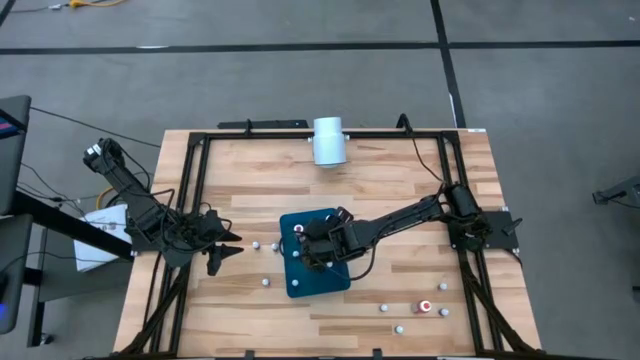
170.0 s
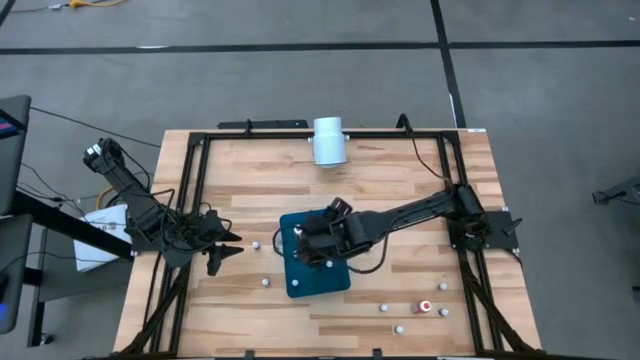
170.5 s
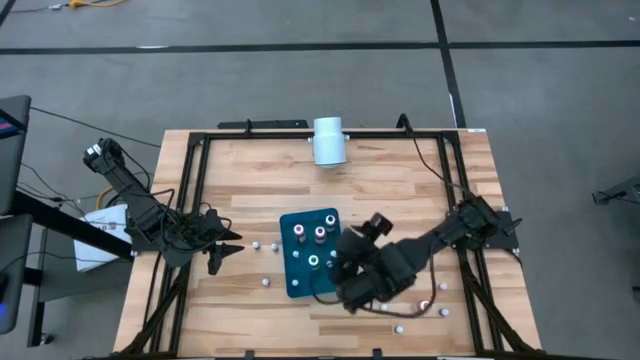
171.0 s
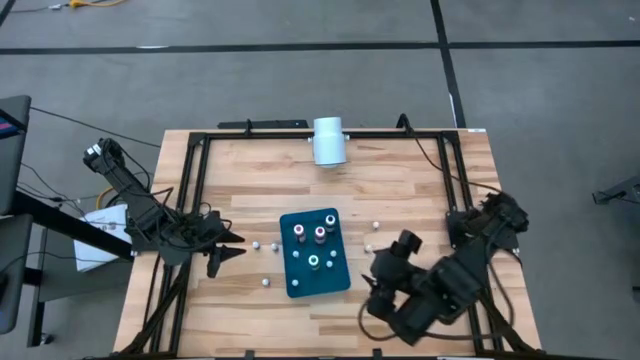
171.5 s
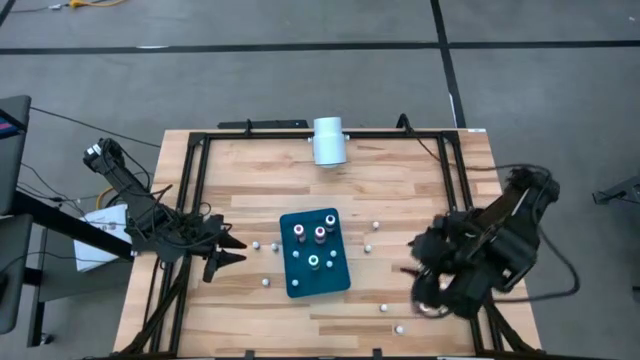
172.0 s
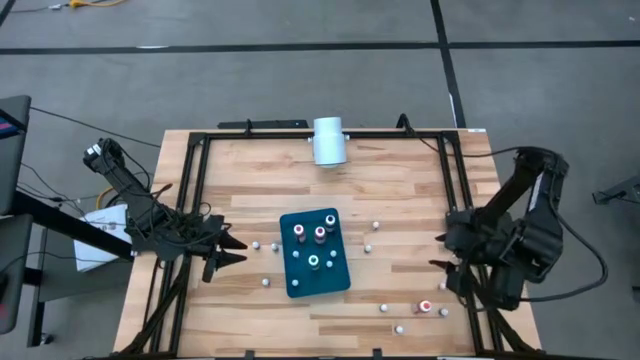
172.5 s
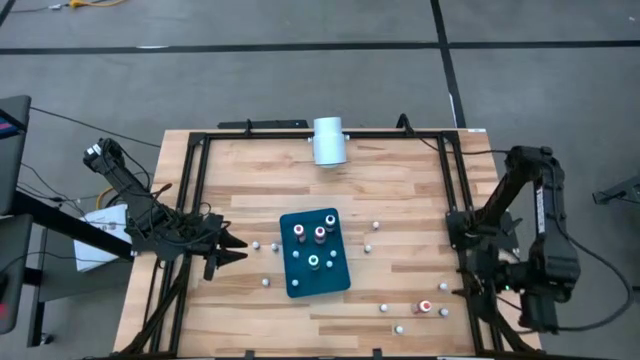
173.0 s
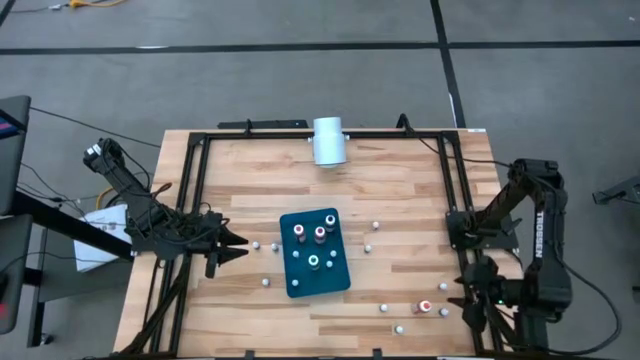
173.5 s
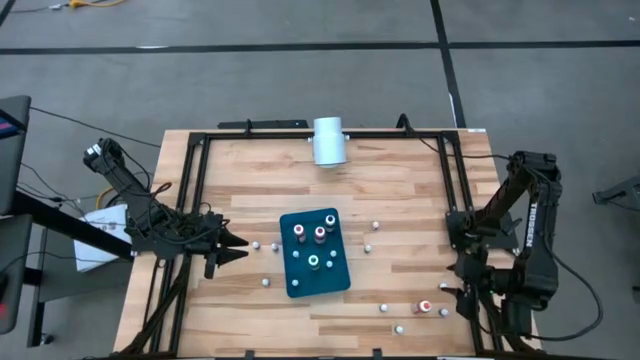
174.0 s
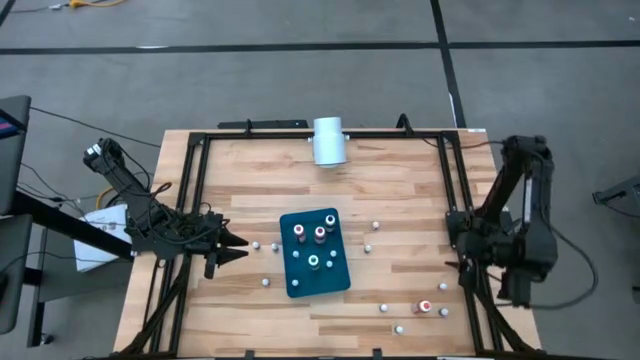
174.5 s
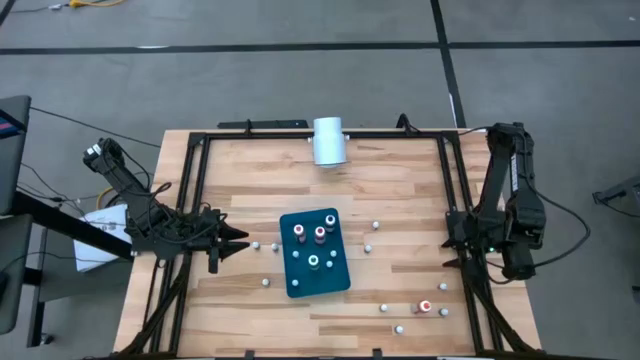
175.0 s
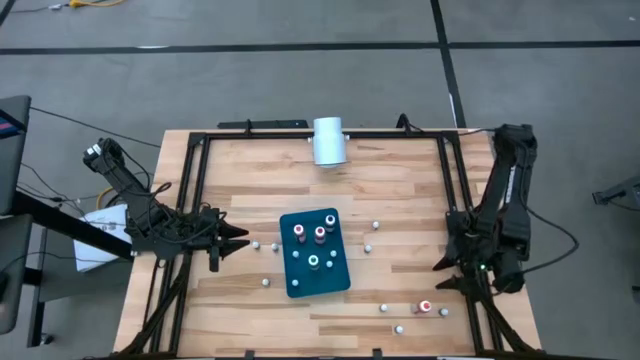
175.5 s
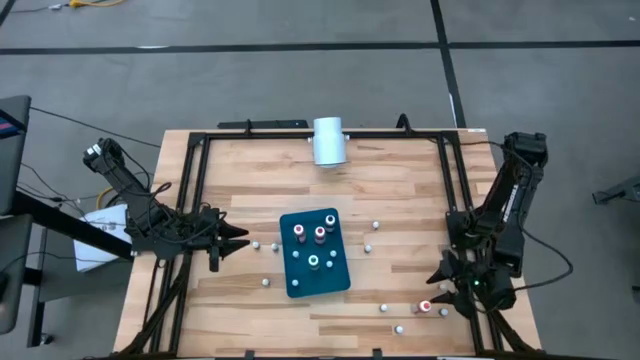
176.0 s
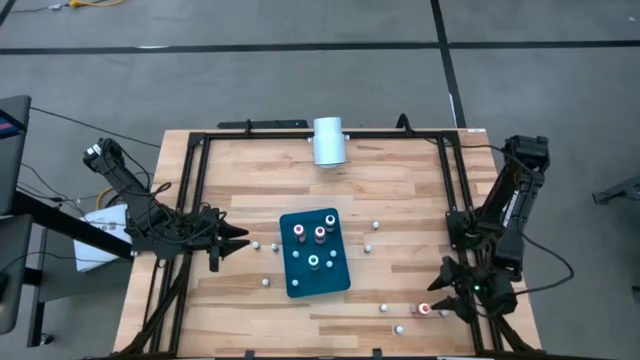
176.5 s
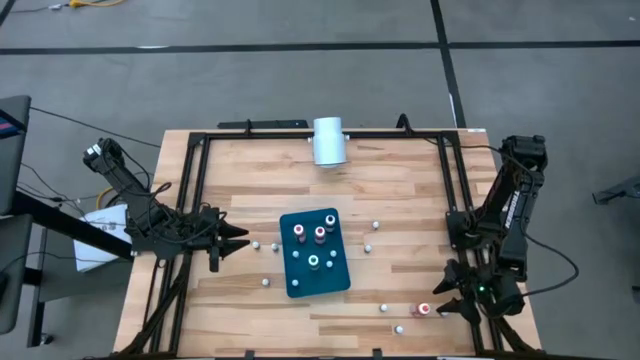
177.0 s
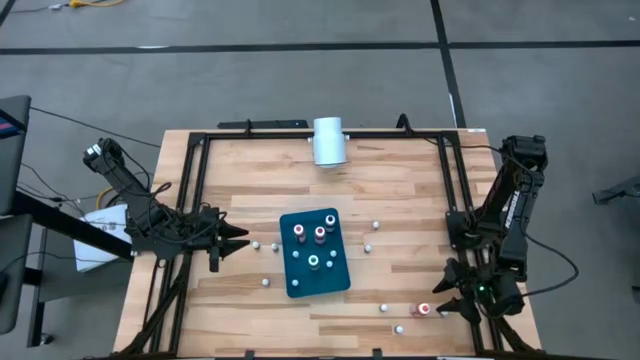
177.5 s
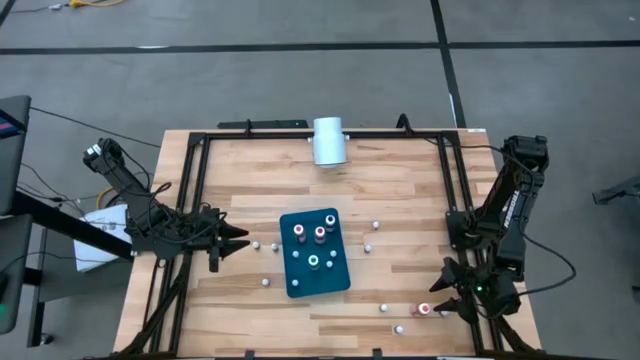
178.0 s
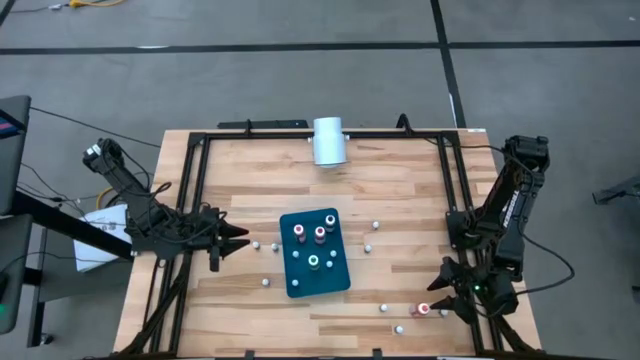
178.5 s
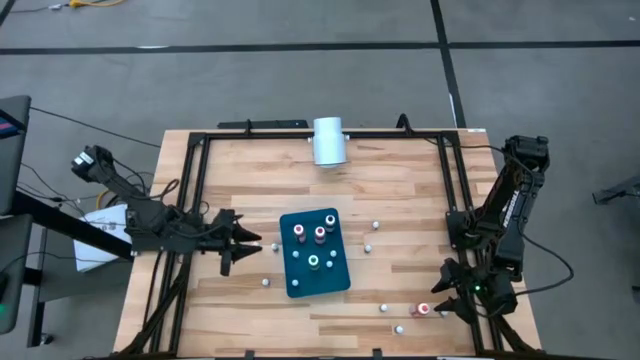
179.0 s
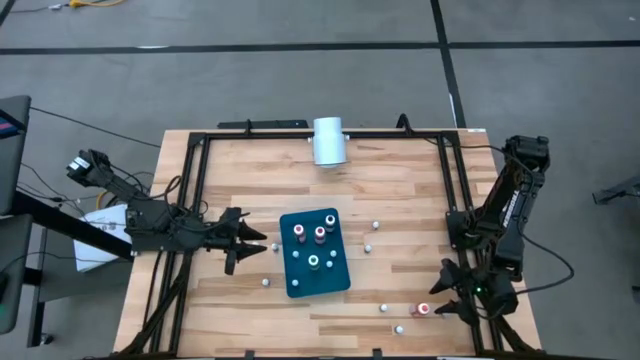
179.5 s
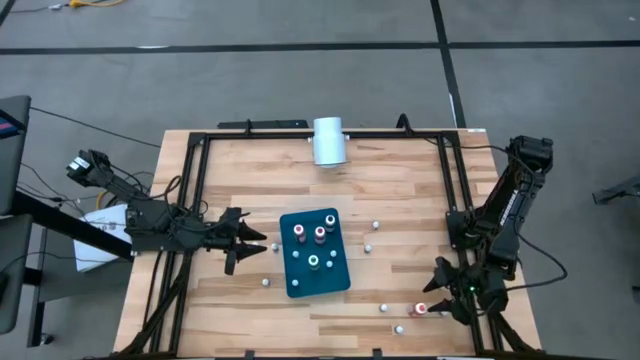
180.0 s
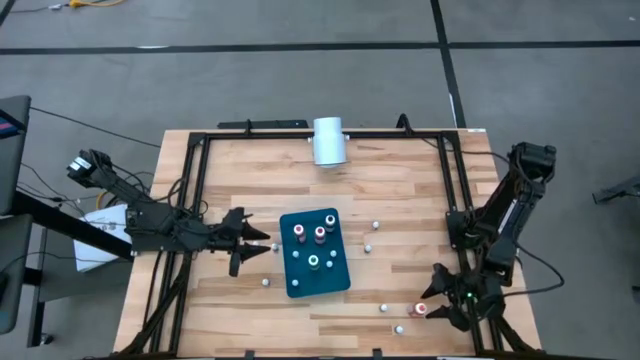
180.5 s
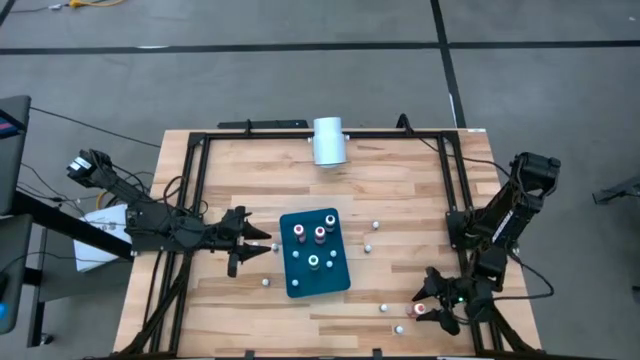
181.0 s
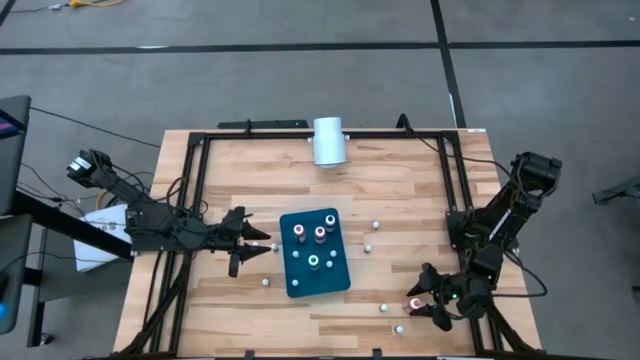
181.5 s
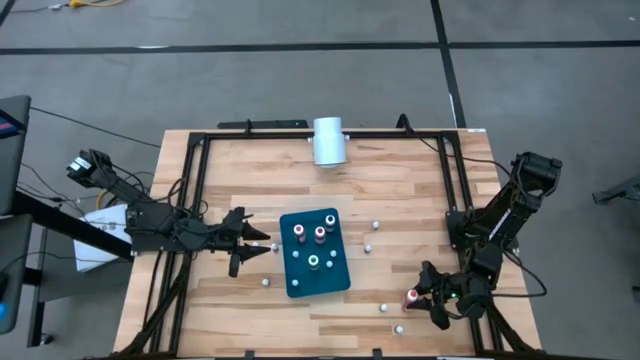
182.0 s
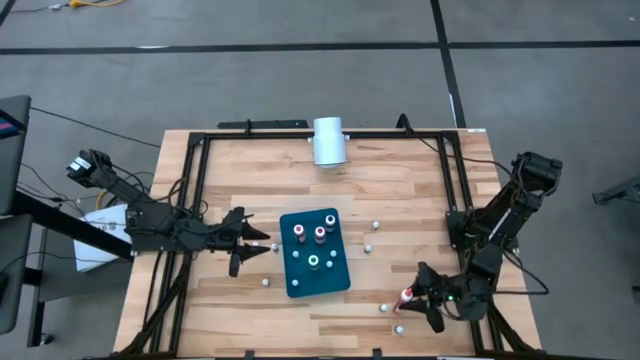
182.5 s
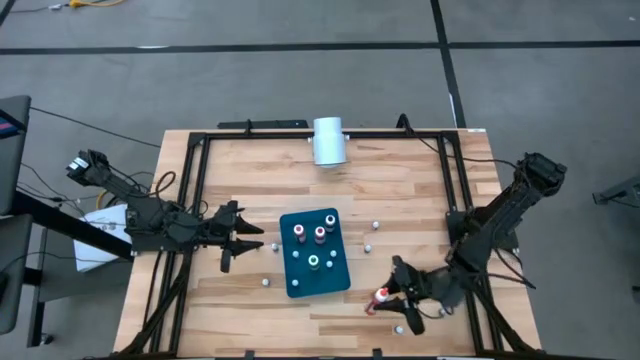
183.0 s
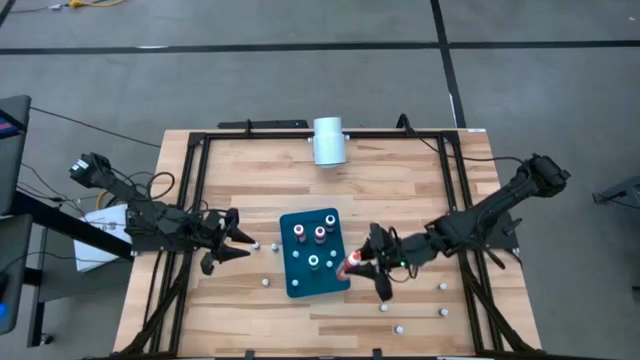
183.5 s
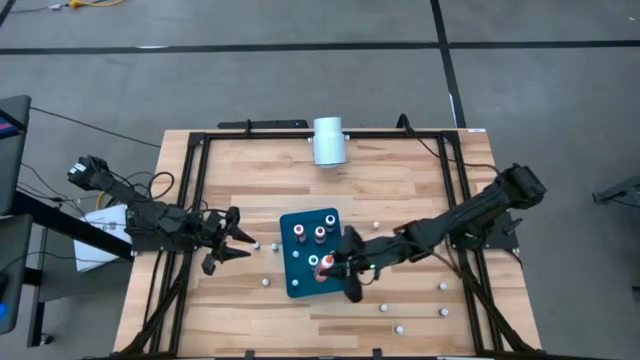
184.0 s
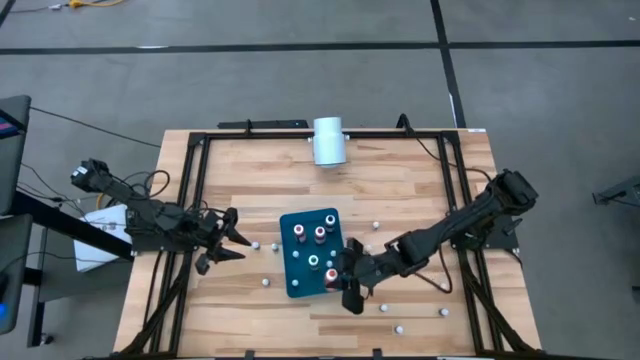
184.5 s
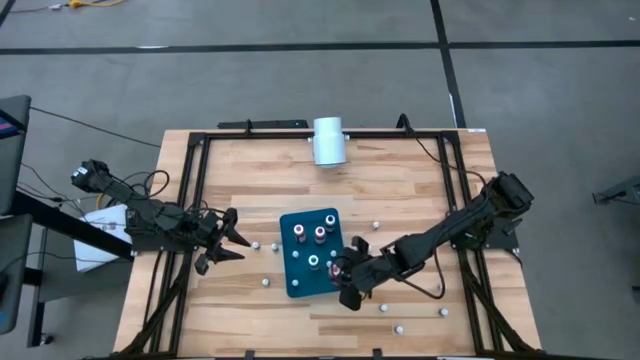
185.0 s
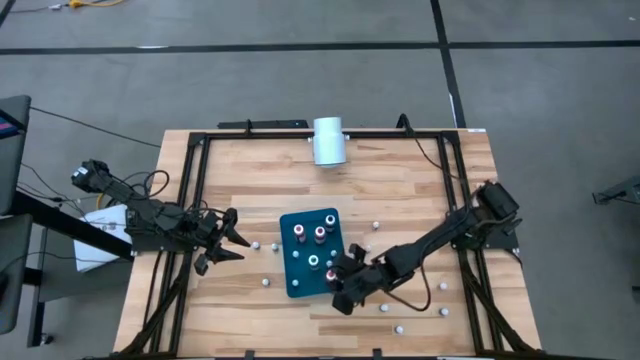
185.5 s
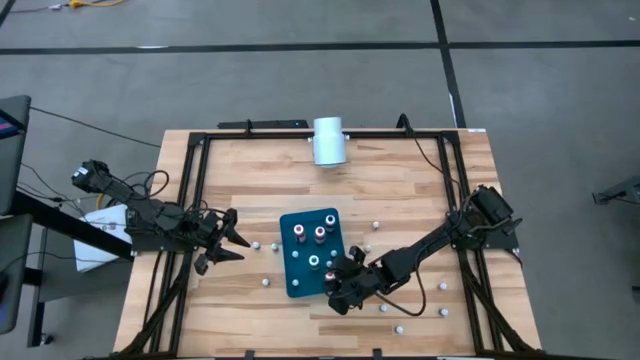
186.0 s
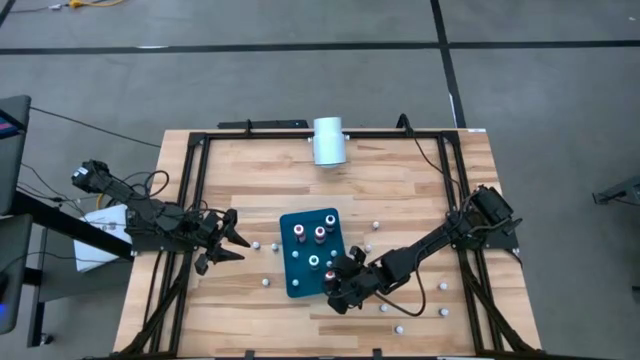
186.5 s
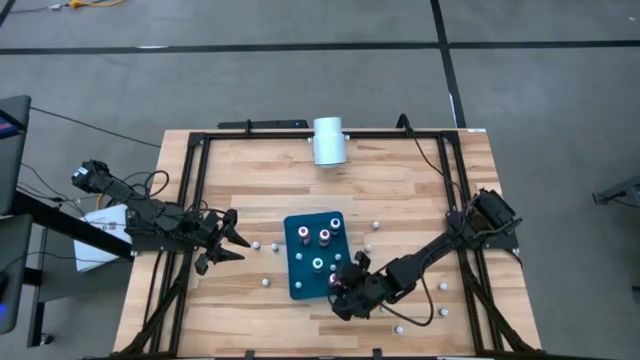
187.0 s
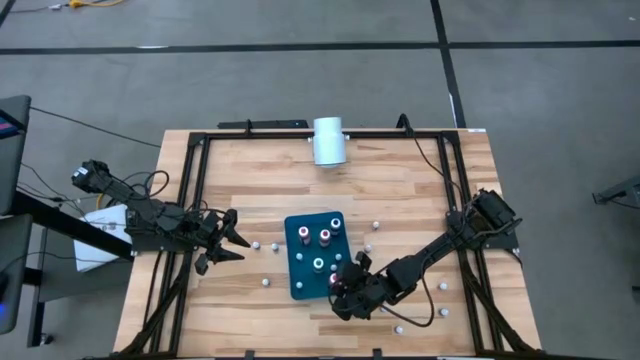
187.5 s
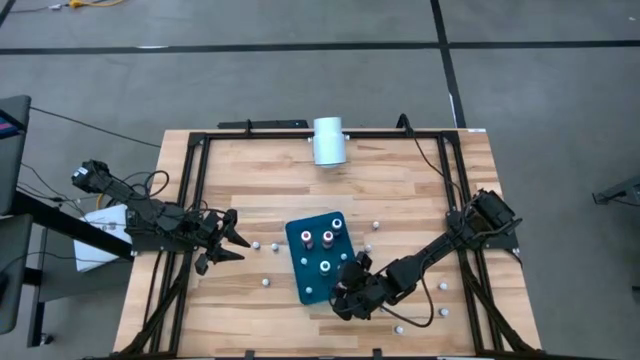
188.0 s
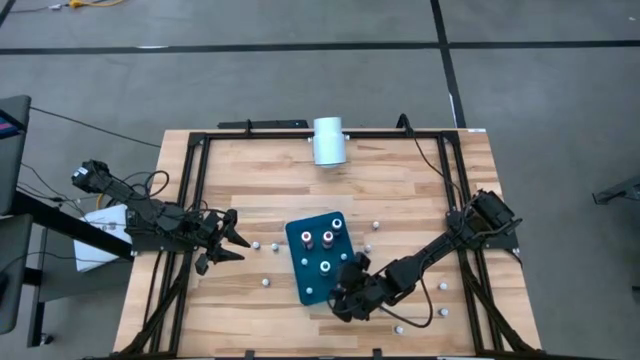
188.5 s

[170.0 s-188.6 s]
Task: Pick & Place food coloring
Put the big orange food coloring bottle into the blue bin

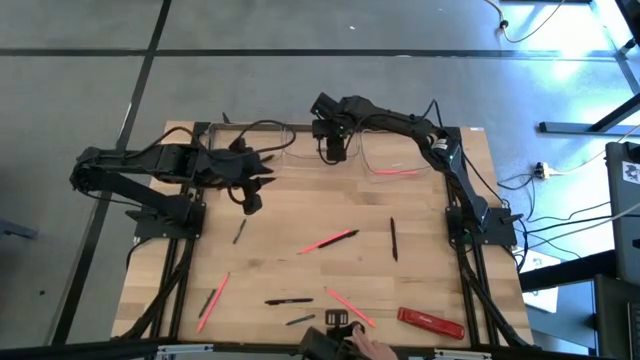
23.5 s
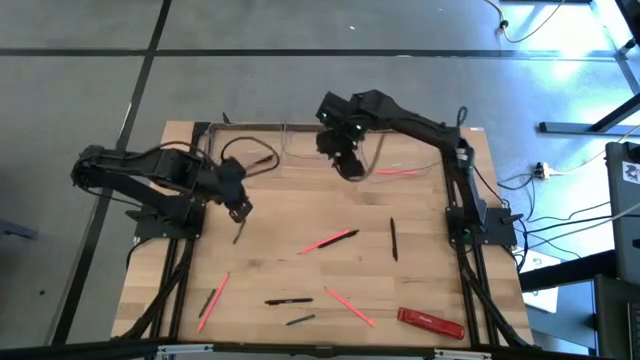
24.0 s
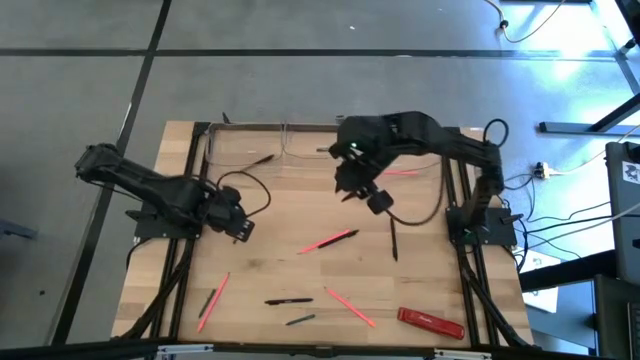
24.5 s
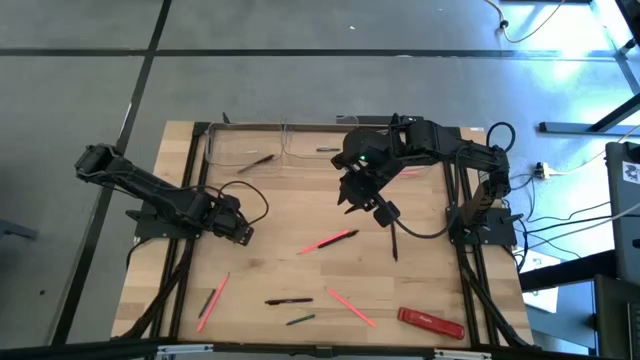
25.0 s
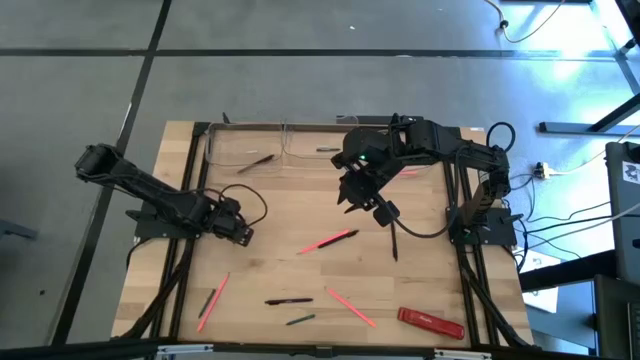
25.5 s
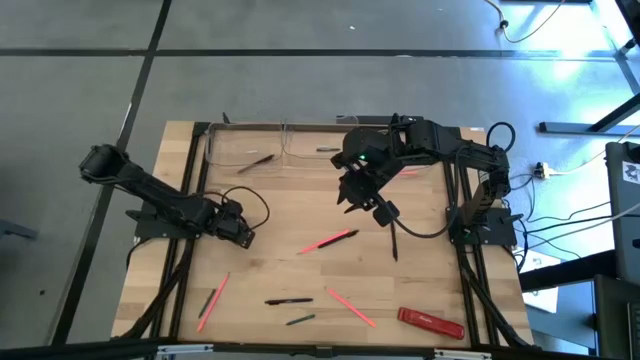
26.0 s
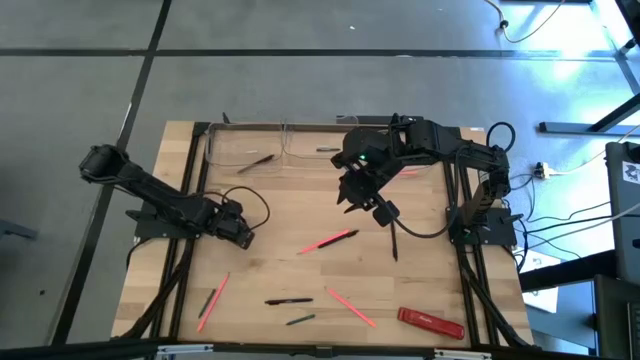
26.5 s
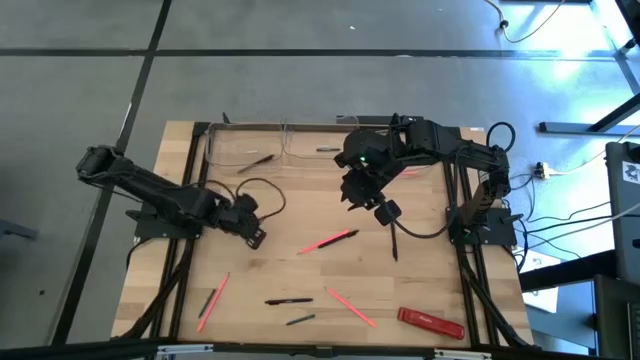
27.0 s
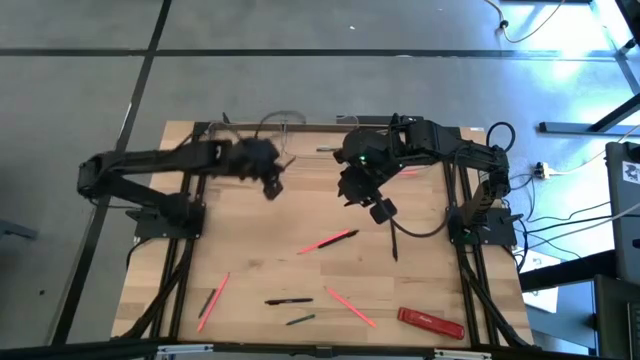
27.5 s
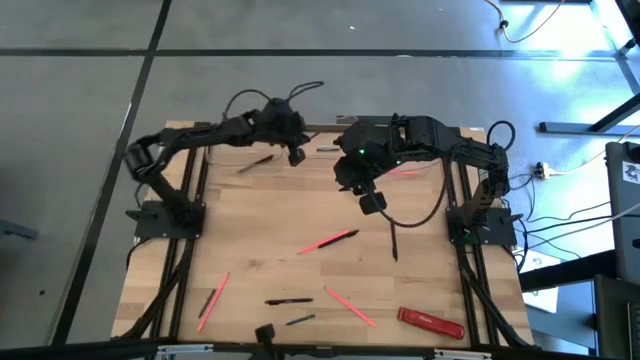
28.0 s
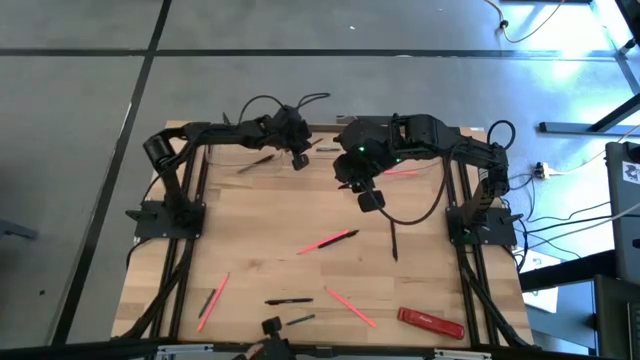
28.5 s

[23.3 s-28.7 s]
Task: Sort crayons/erasers/pens/pencils in bins
Put the green crayon into the middle transparent bin
